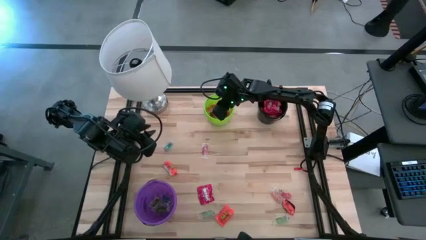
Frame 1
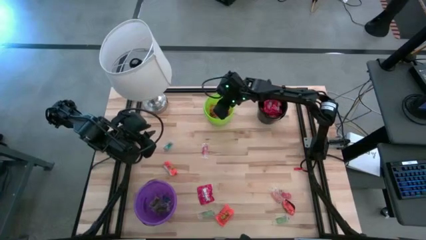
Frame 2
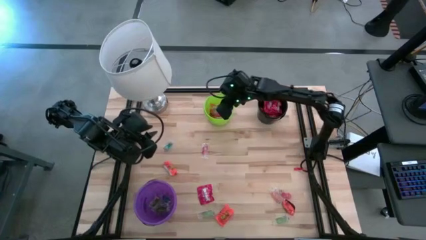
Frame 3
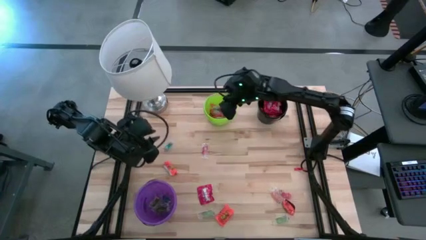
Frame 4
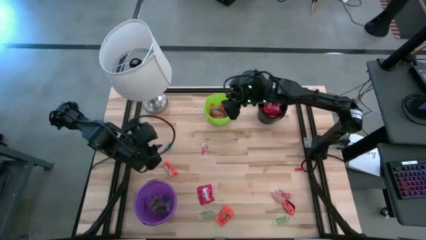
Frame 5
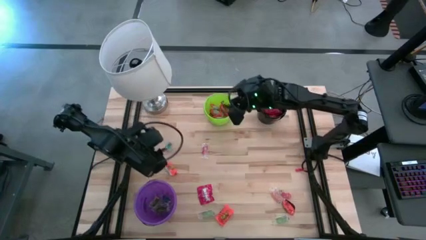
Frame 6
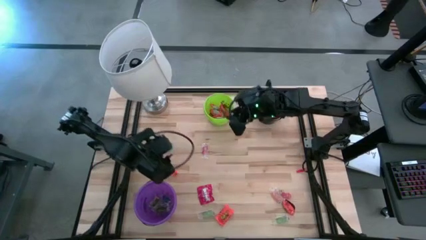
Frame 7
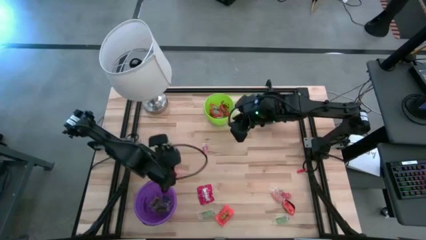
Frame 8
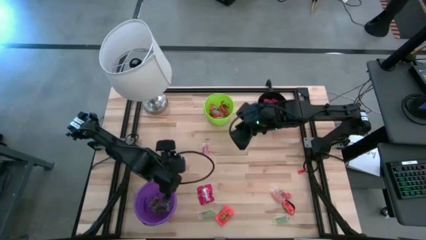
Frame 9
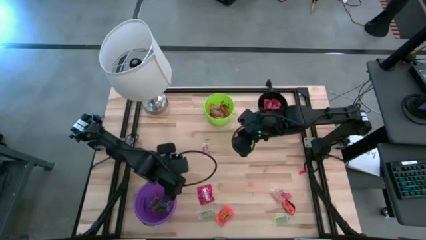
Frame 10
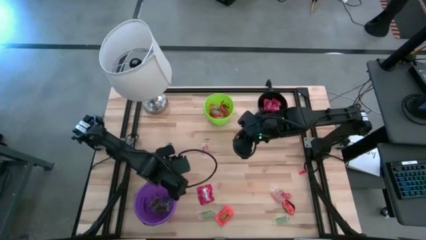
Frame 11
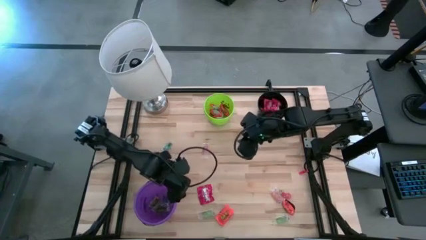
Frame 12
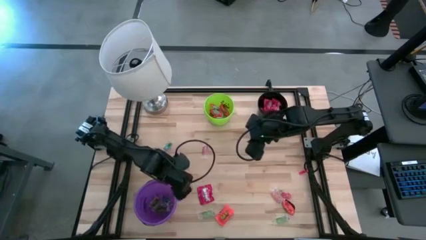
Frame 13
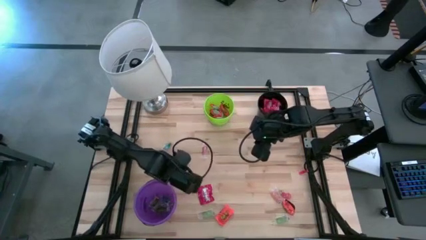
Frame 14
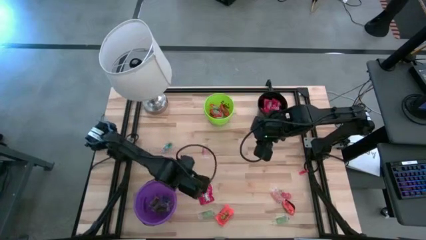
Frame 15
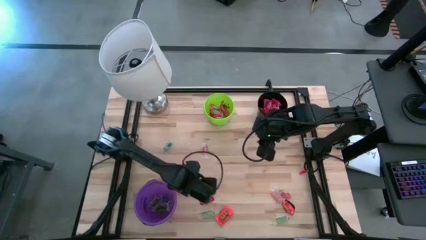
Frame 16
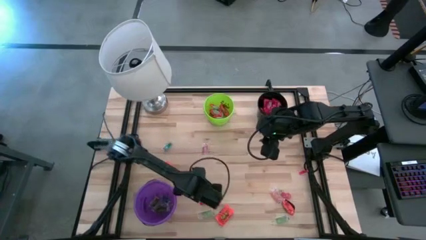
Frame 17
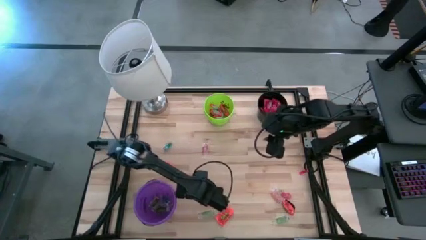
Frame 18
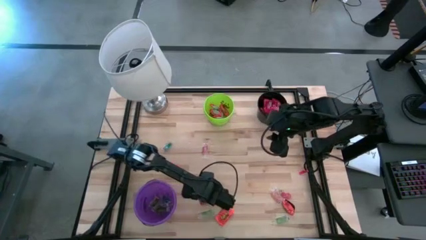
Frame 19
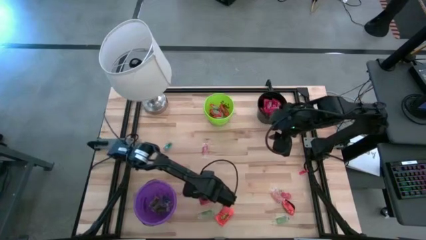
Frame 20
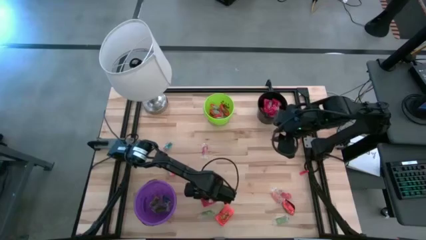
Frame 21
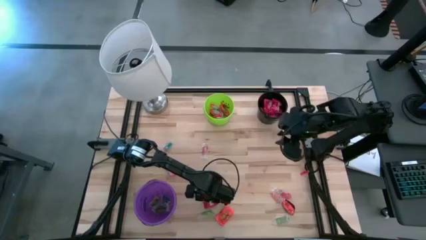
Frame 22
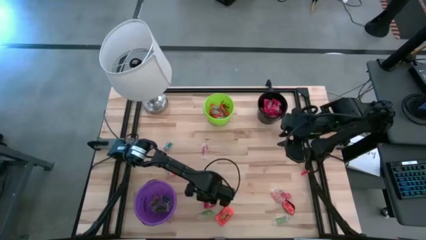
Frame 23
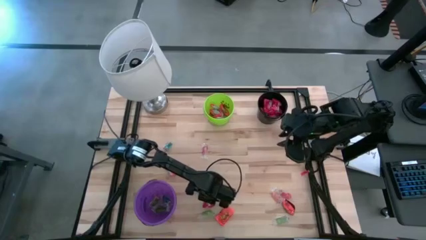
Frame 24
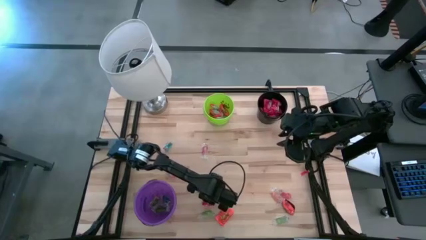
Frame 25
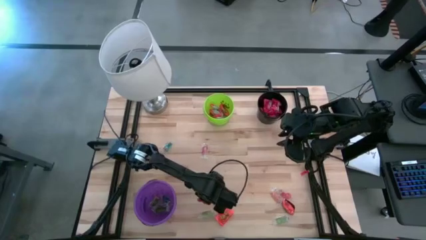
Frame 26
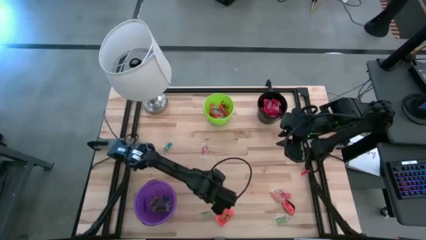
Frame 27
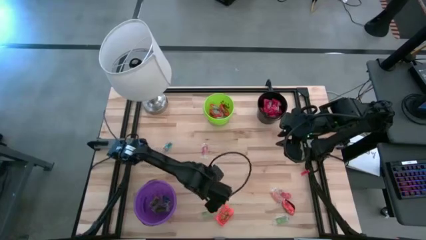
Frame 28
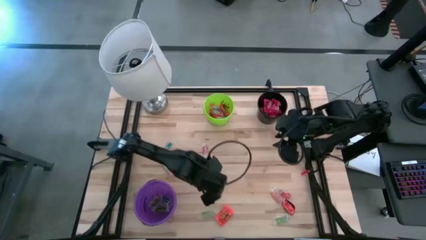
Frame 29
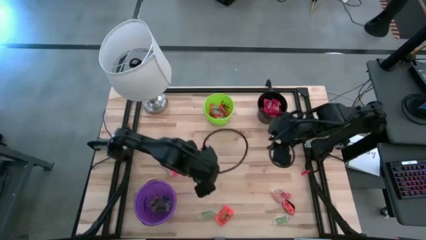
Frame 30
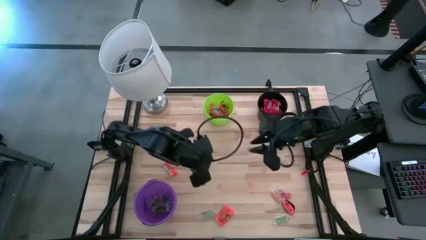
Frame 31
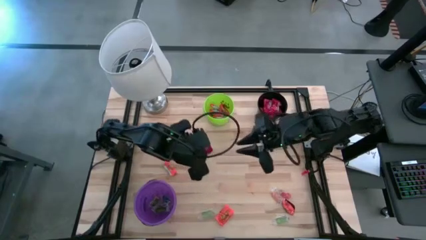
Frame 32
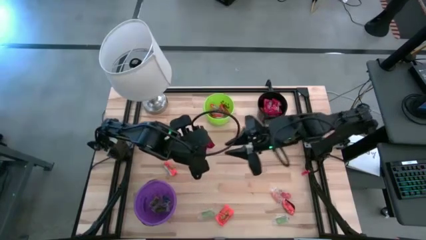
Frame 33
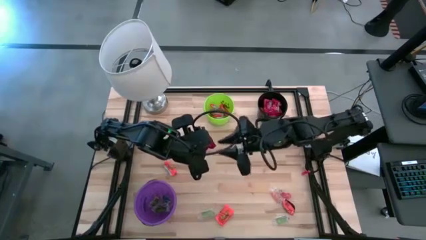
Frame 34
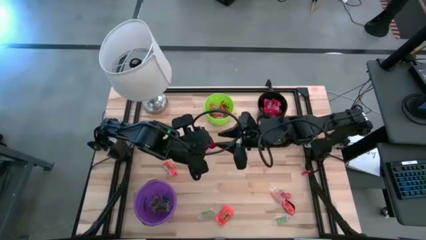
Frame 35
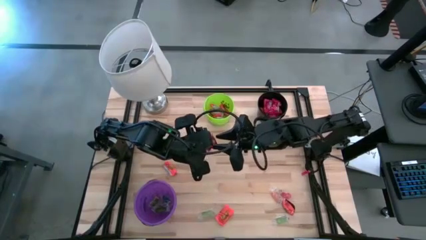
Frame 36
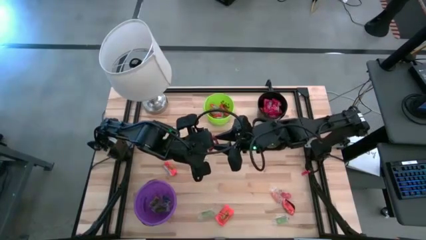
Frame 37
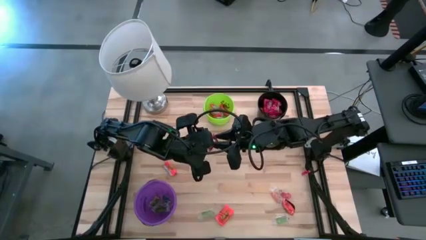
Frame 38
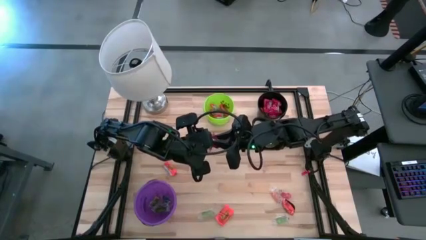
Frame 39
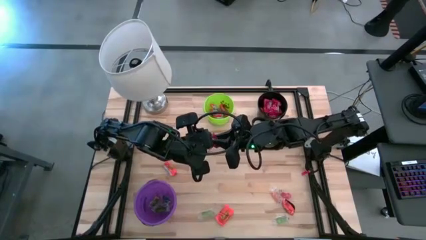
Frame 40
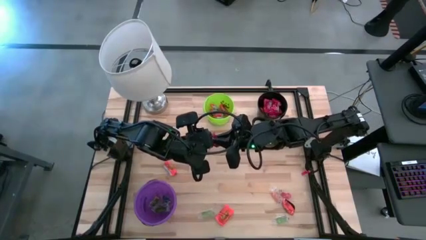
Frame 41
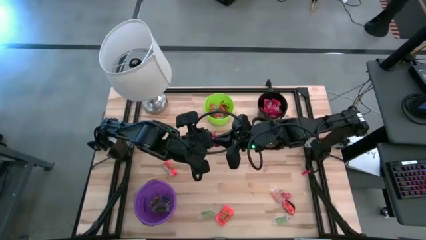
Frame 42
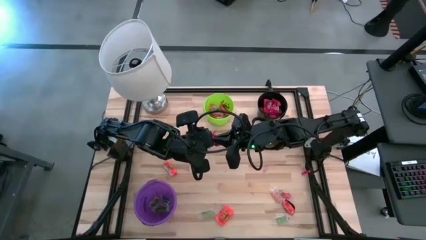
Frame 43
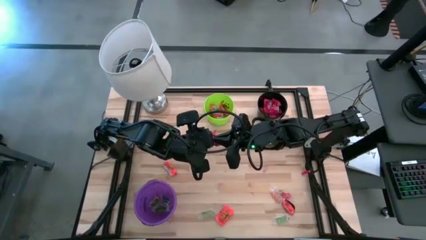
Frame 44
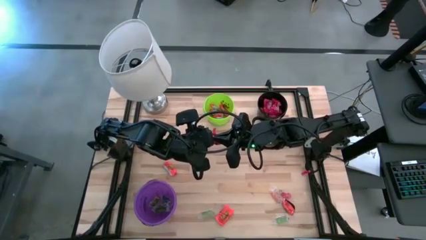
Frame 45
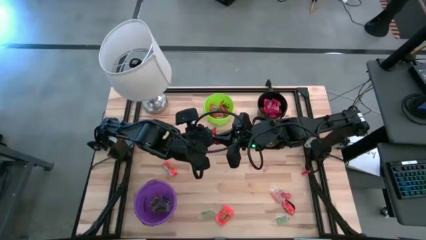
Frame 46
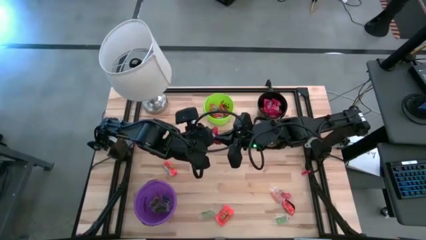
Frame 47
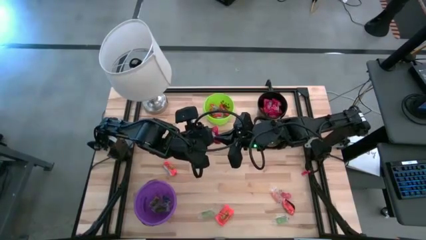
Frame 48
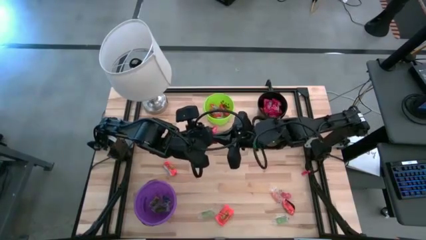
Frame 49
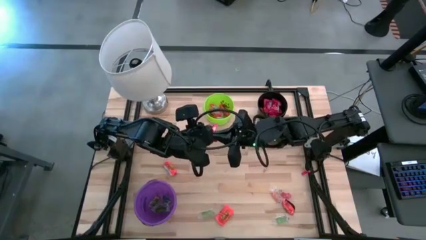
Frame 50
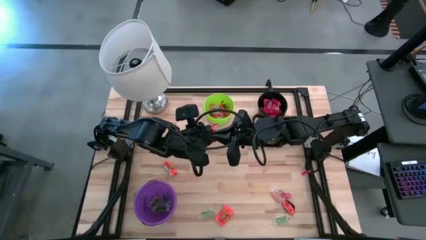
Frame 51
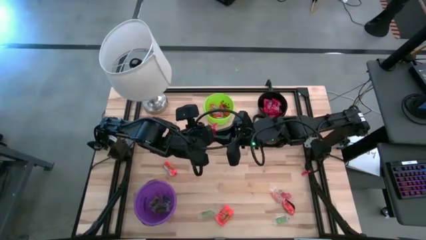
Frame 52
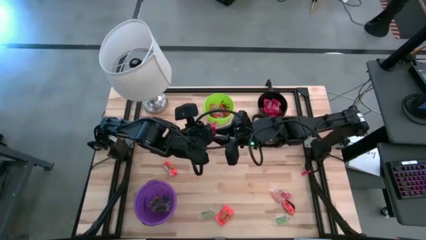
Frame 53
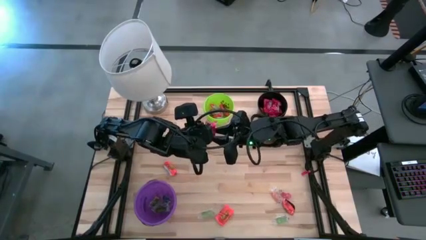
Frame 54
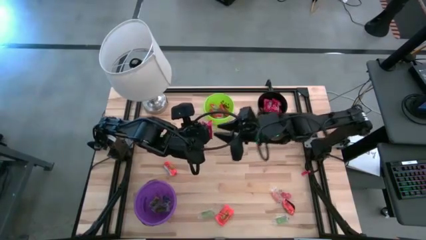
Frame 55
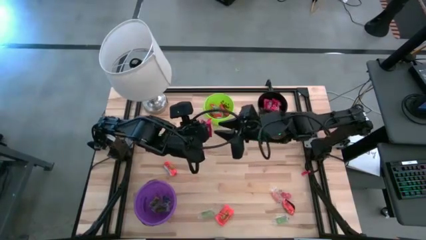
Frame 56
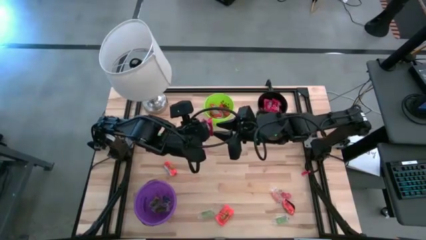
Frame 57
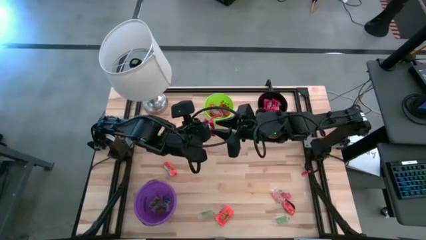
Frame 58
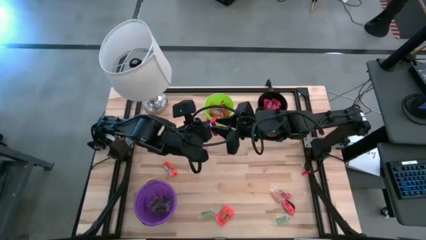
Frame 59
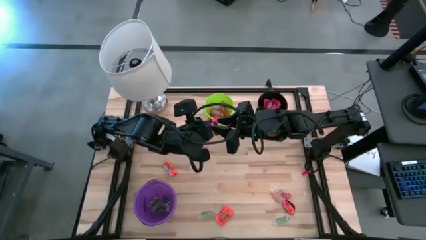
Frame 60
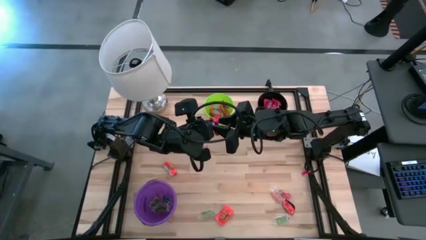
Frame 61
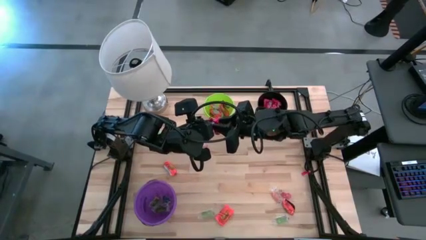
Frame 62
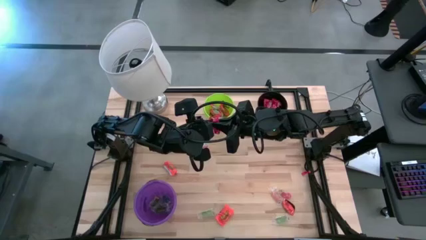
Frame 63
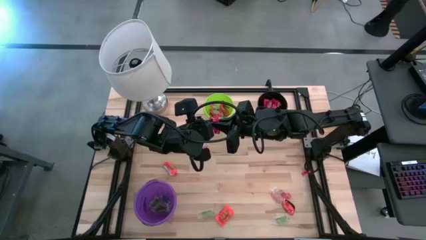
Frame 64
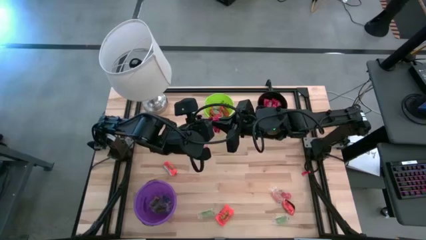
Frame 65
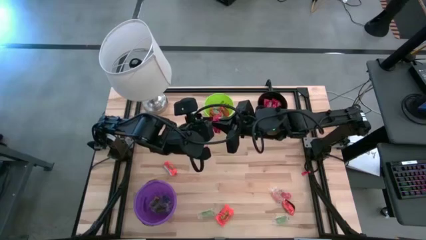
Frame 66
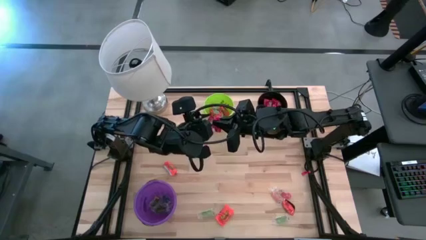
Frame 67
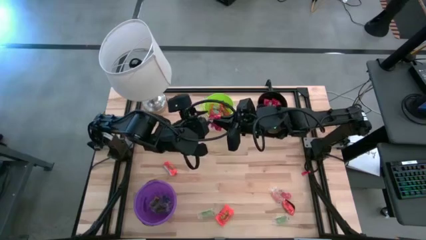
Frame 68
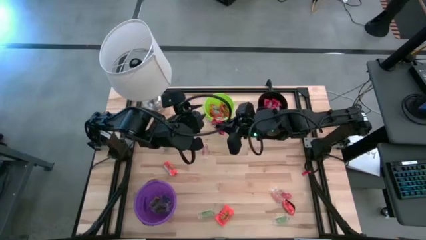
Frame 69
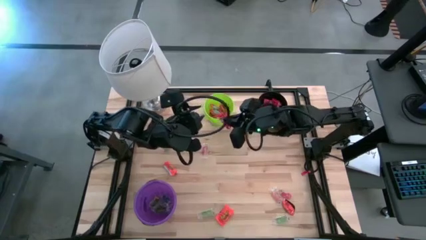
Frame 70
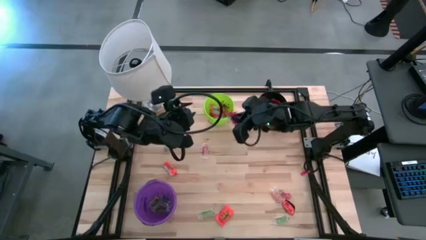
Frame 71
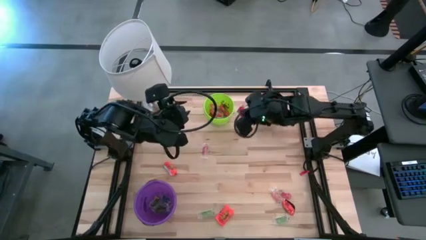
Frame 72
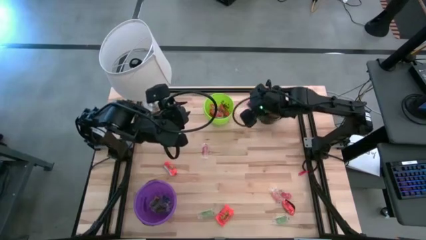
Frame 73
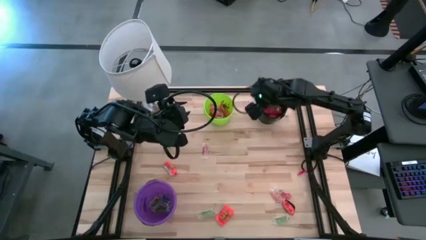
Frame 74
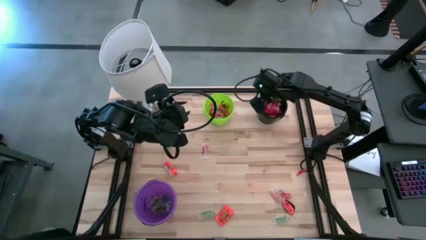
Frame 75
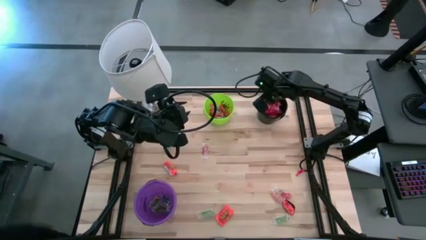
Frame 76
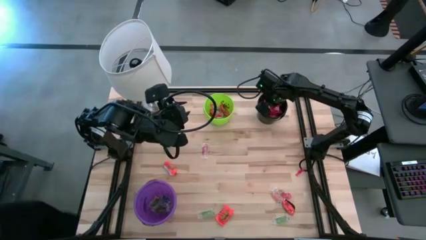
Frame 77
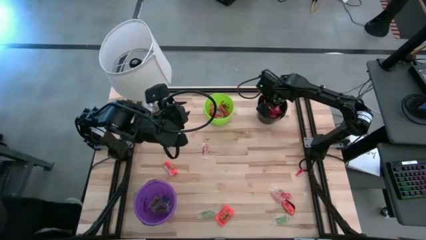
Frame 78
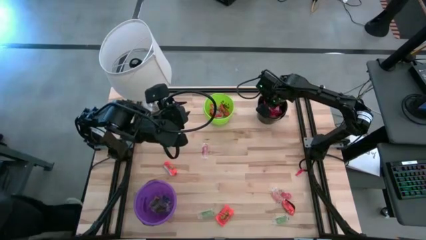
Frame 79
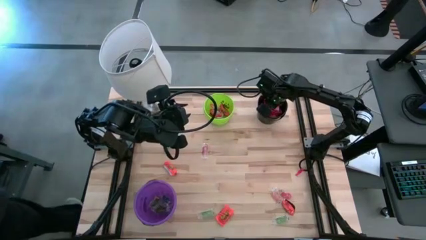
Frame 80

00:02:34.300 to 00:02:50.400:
Task: Sort candy
Put the red candy into the black bucket

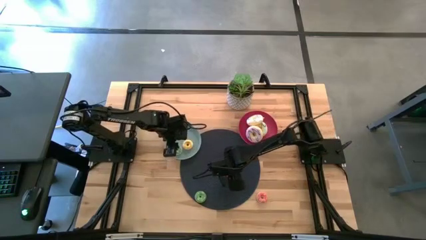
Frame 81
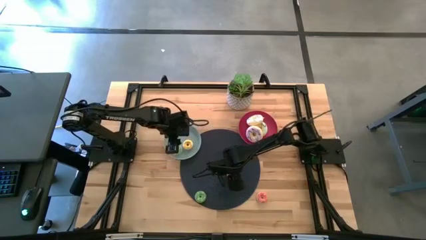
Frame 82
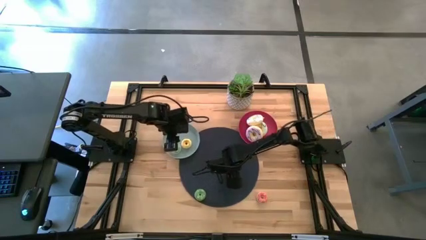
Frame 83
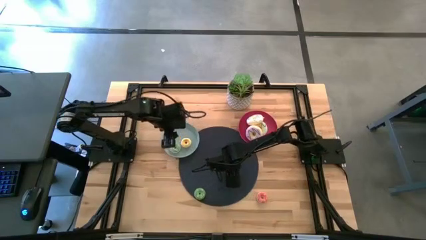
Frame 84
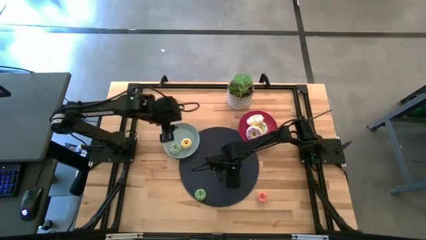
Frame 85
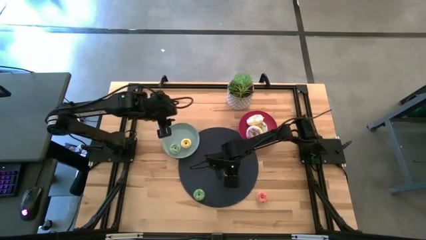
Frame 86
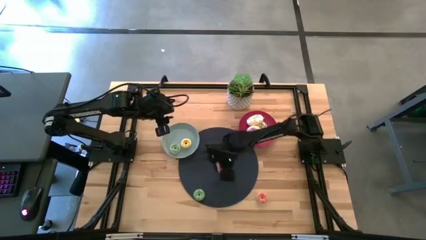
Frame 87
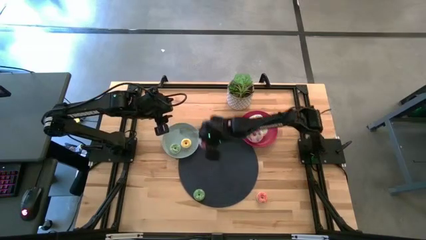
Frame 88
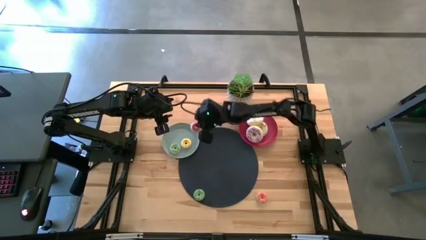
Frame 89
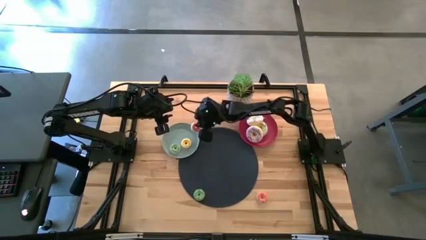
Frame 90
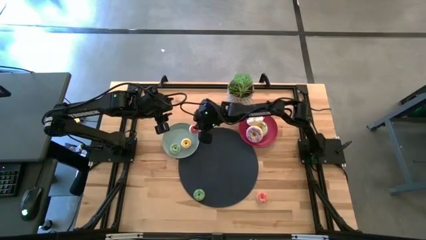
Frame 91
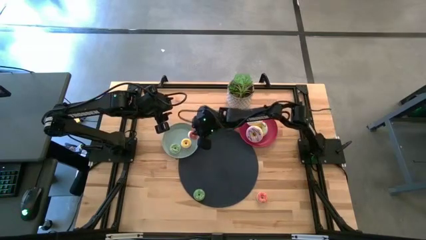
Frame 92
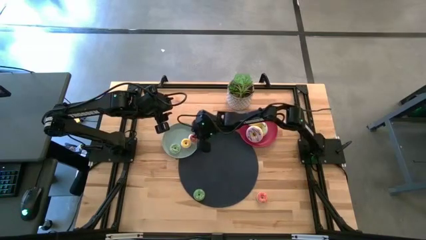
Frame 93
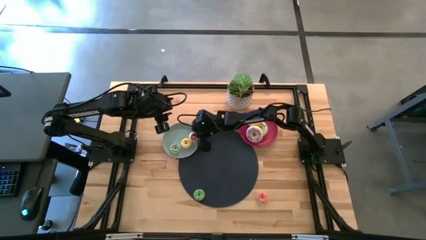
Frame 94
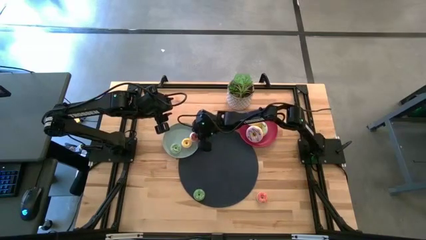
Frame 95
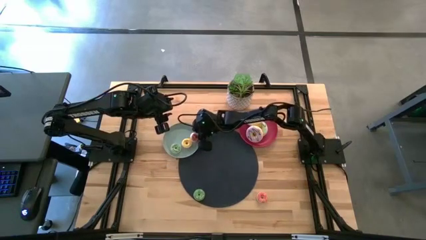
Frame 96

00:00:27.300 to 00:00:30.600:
Task: Pick & Place donuts
Put the left small pink doughnut on the blue plate
